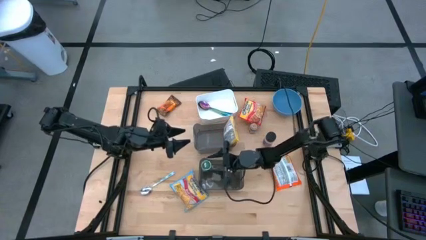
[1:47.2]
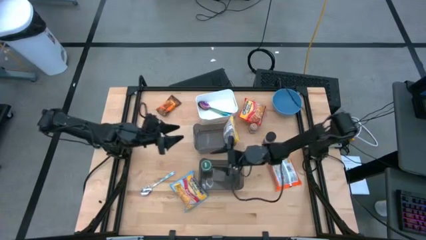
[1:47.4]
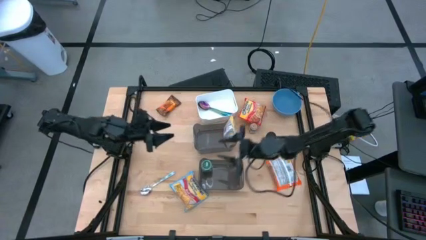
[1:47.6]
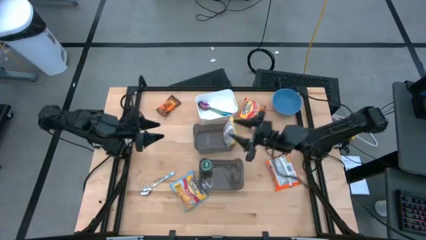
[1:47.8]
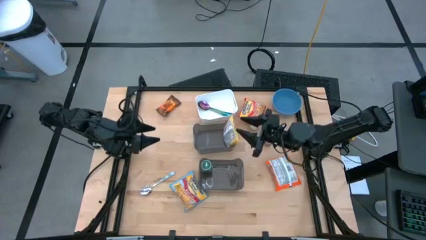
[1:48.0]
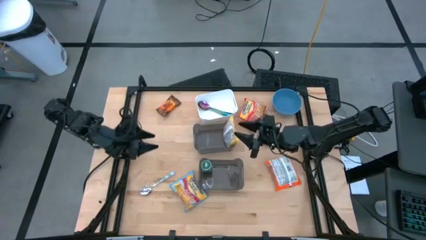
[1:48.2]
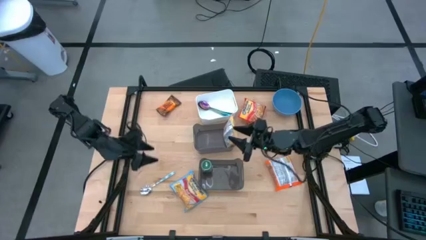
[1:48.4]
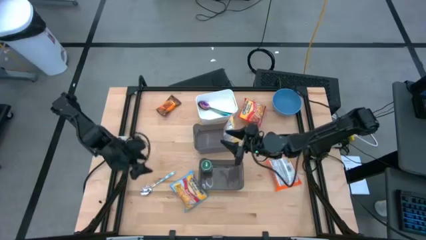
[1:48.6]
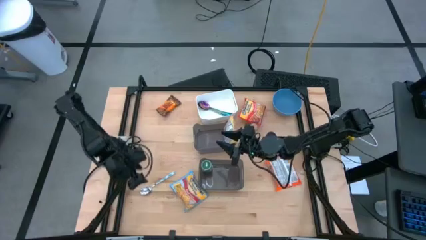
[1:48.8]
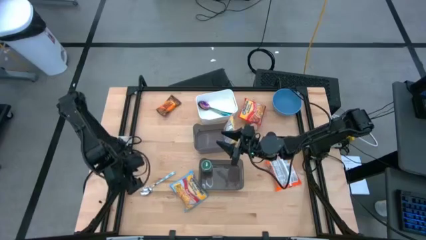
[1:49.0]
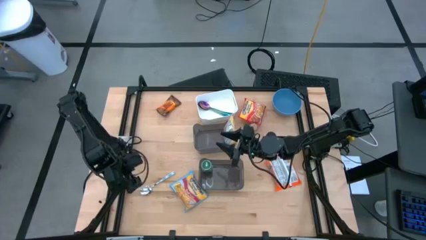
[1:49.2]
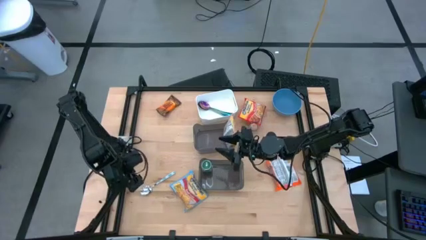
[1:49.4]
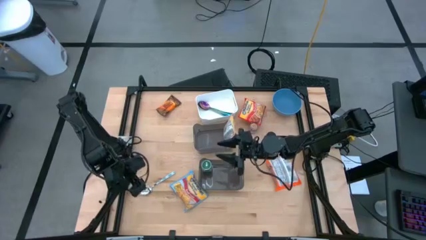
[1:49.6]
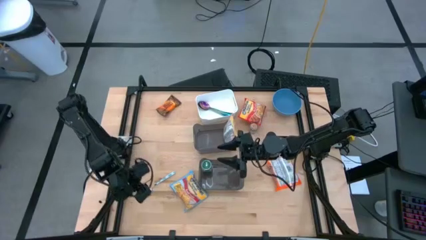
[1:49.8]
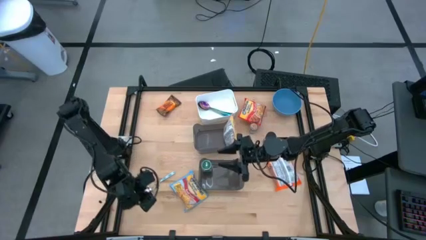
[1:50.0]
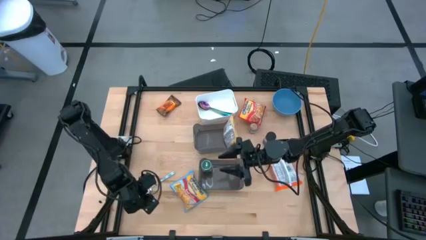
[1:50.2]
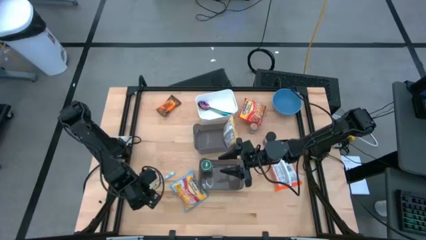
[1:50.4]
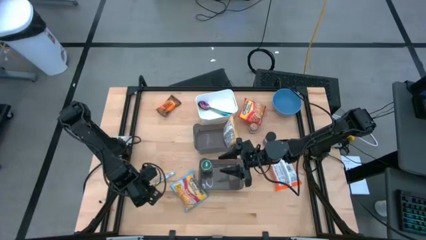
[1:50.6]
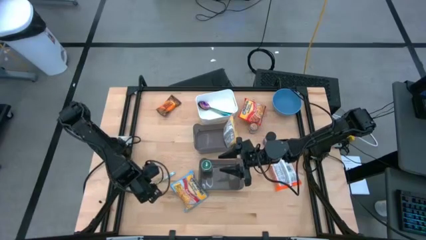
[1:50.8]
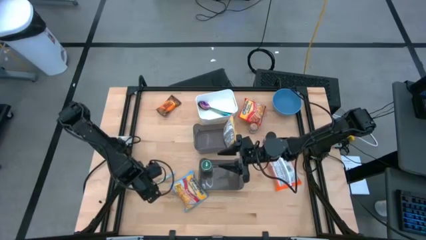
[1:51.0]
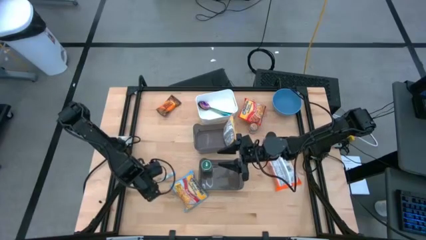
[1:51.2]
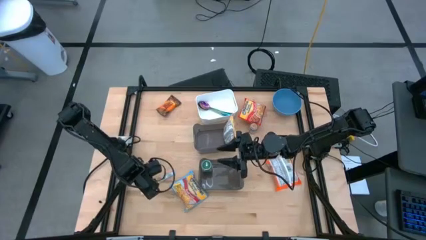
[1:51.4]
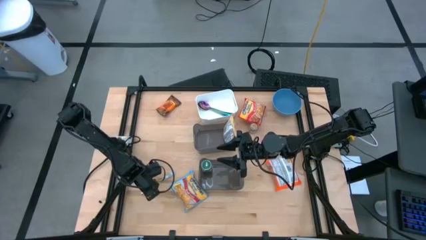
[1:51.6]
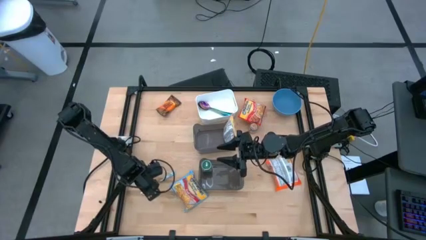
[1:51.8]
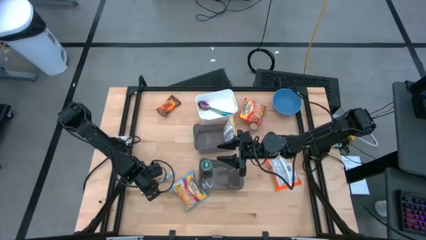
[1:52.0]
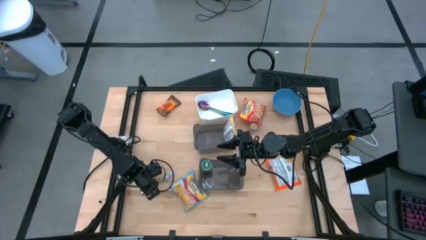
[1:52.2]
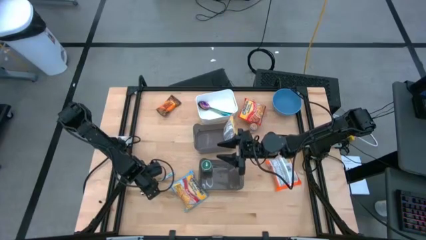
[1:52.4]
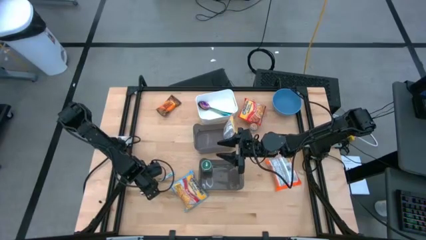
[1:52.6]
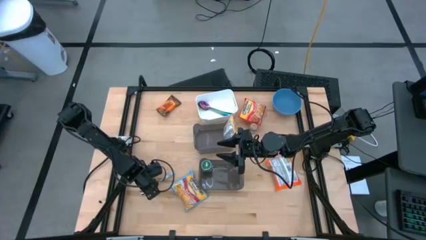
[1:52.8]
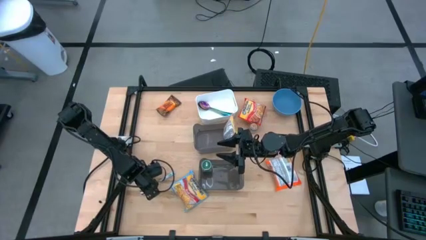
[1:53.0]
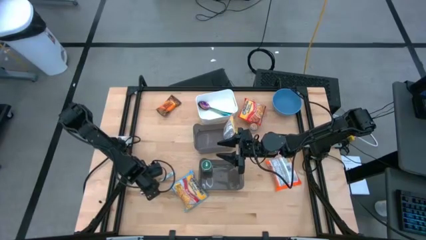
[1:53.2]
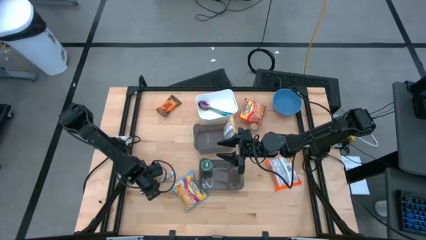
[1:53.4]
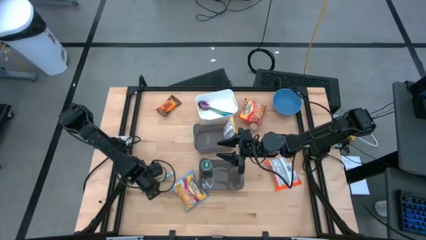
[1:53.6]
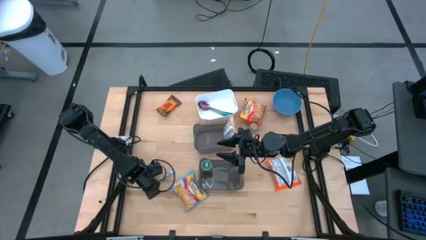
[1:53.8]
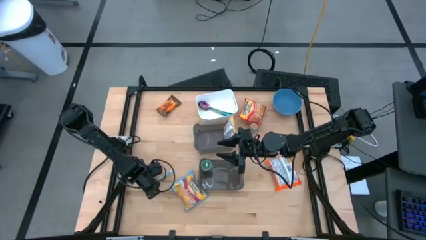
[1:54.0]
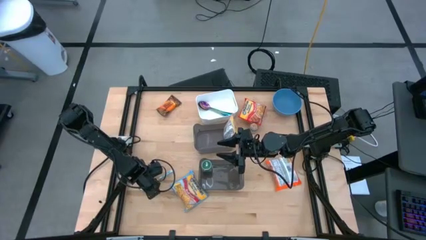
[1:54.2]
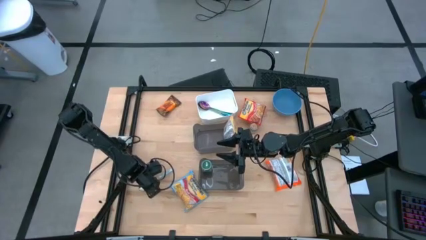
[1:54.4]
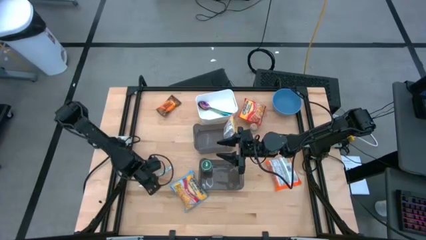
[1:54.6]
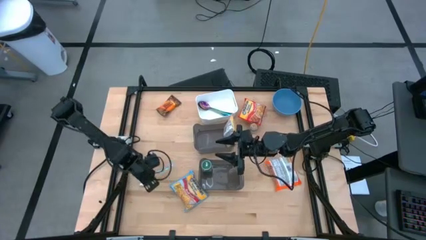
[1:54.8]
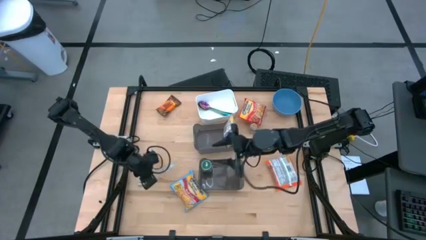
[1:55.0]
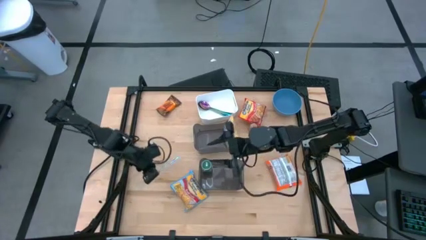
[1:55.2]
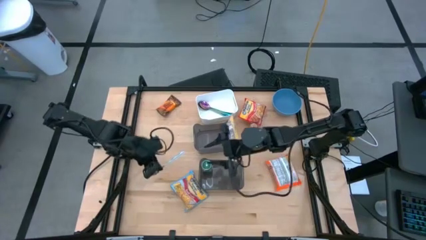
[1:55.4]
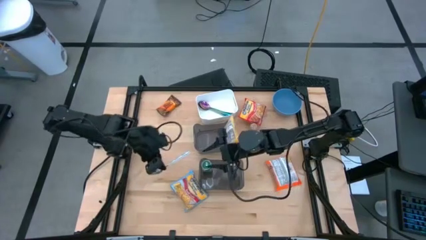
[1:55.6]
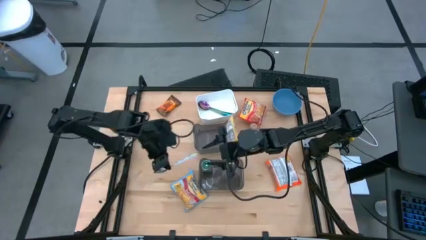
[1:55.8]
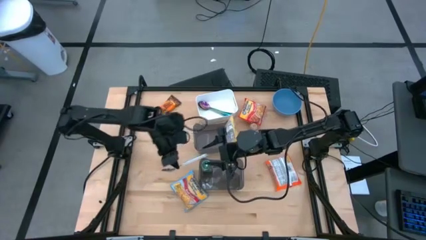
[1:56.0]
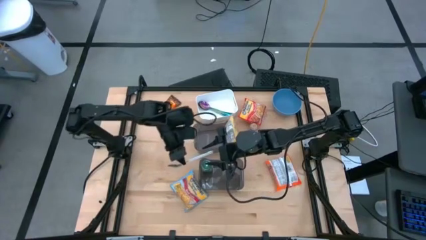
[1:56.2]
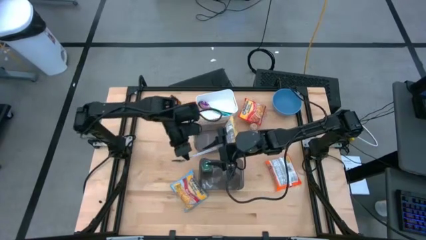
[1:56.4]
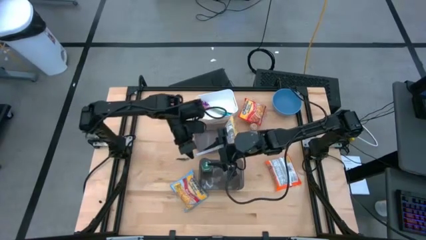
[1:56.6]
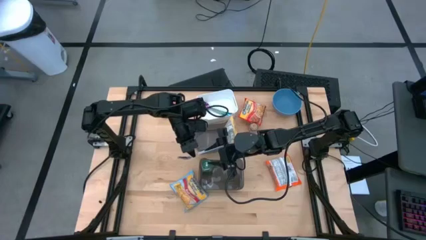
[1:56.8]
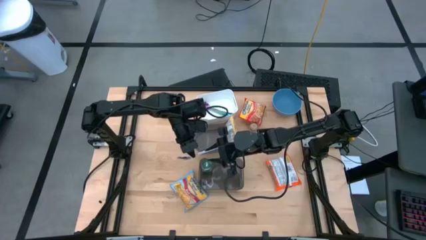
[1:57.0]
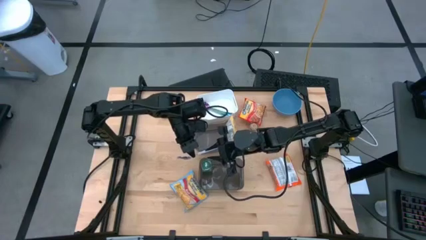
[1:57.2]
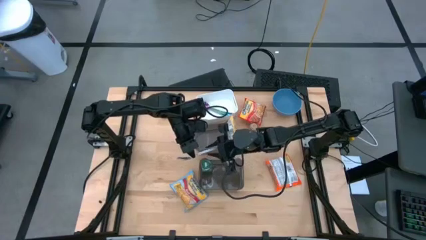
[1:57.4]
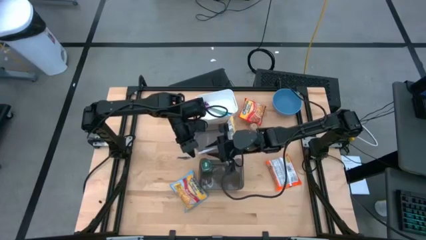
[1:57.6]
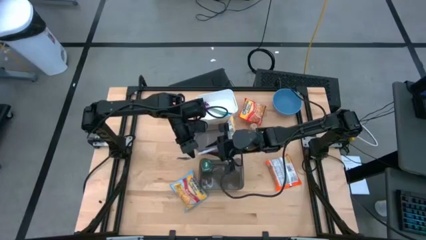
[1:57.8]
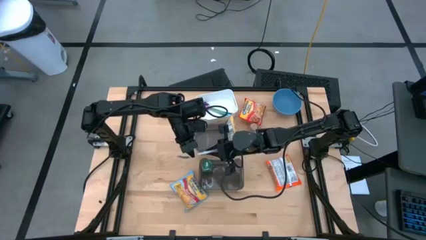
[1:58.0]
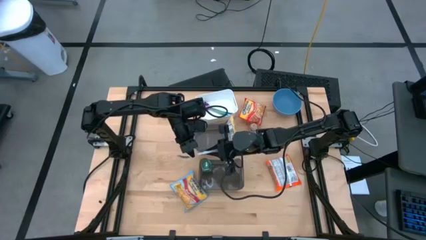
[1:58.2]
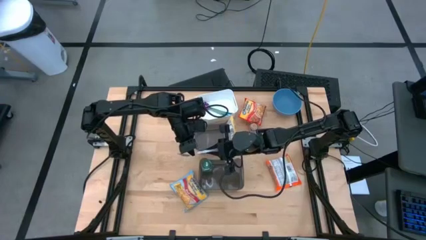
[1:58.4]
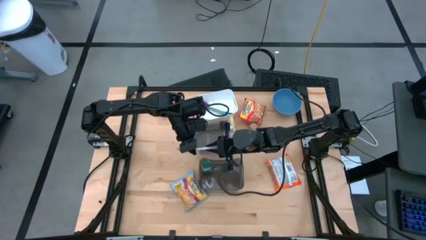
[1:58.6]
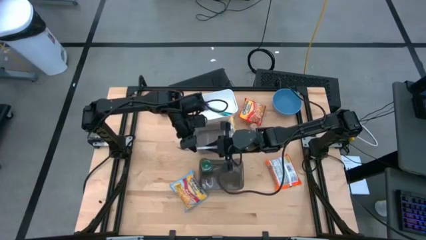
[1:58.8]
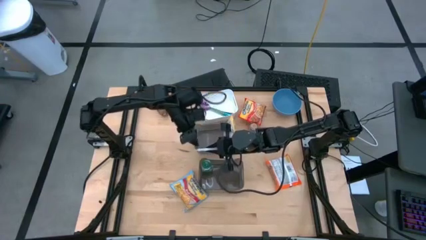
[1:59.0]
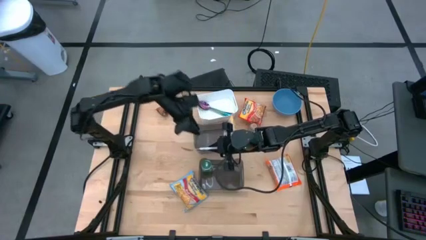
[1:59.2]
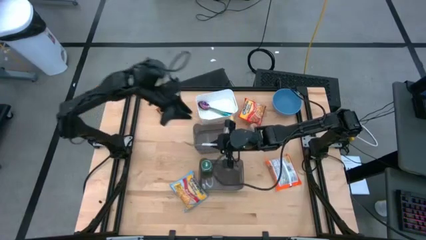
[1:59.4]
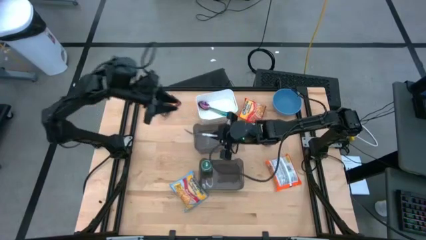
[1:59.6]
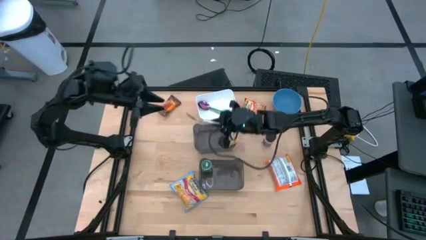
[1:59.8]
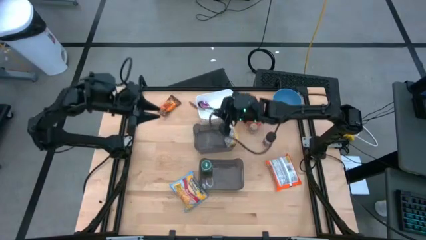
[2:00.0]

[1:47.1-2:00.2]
Task: Pick & Place Food Item
Put the blue patterned spoon into the white bin
